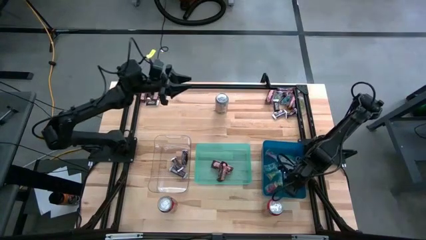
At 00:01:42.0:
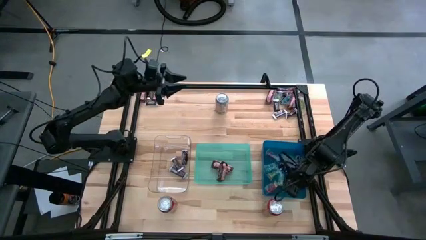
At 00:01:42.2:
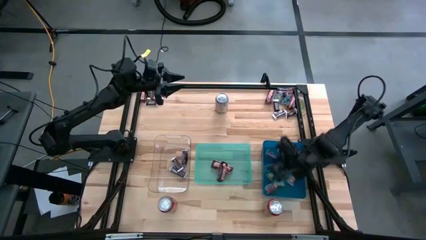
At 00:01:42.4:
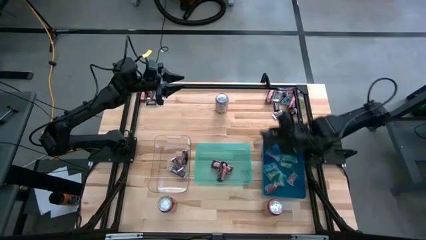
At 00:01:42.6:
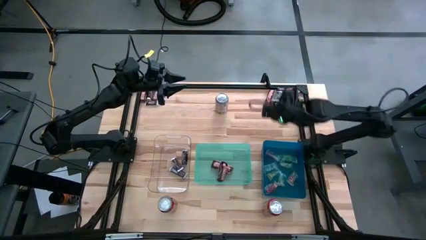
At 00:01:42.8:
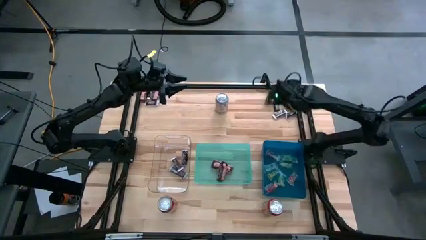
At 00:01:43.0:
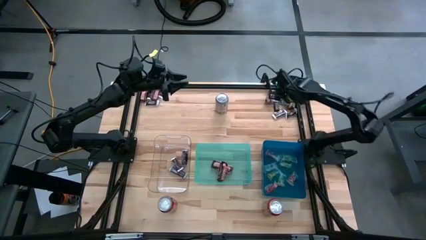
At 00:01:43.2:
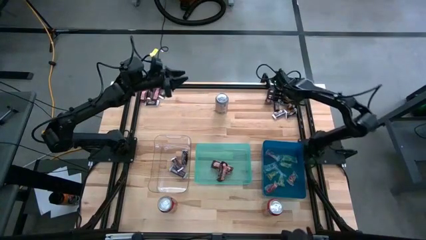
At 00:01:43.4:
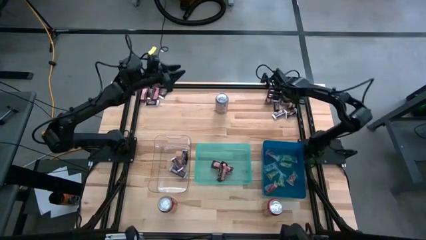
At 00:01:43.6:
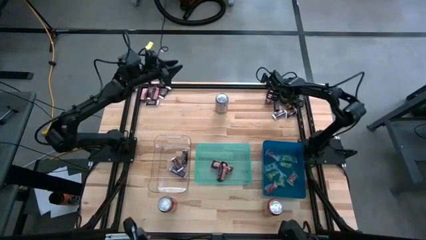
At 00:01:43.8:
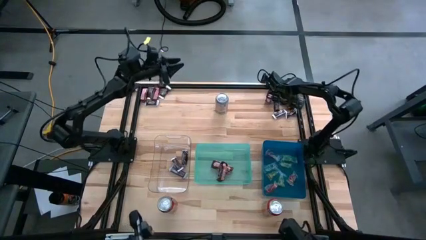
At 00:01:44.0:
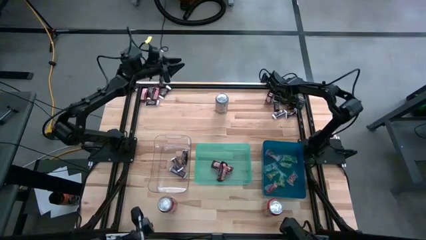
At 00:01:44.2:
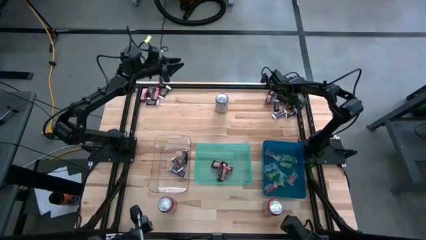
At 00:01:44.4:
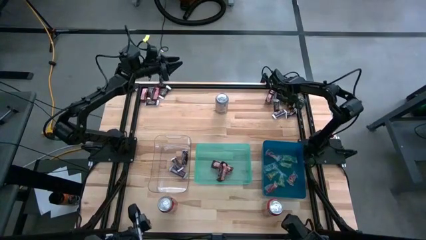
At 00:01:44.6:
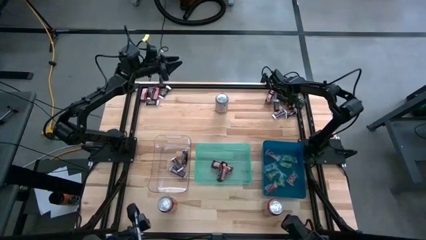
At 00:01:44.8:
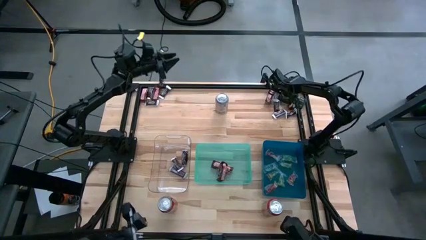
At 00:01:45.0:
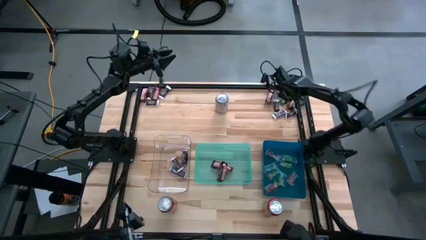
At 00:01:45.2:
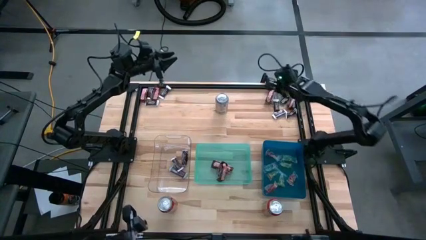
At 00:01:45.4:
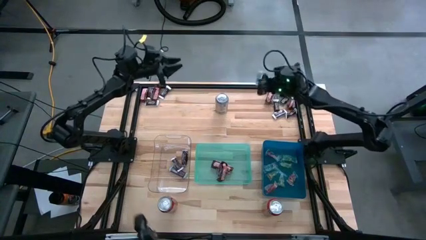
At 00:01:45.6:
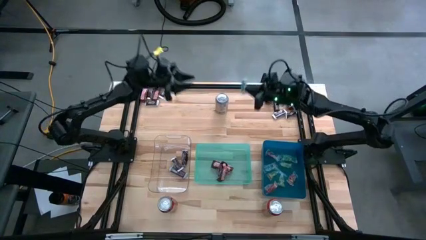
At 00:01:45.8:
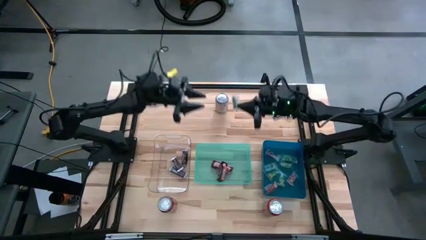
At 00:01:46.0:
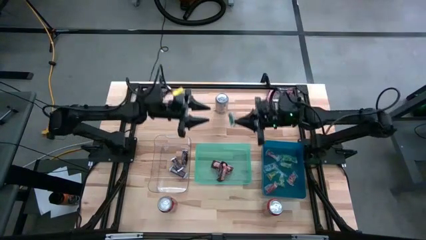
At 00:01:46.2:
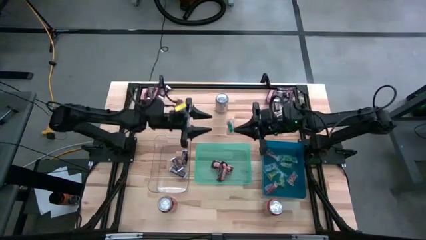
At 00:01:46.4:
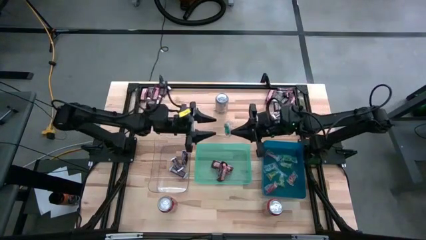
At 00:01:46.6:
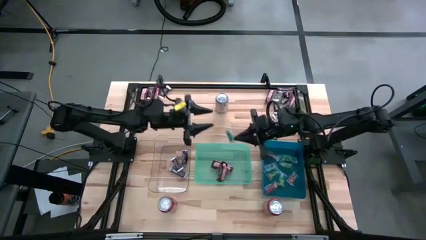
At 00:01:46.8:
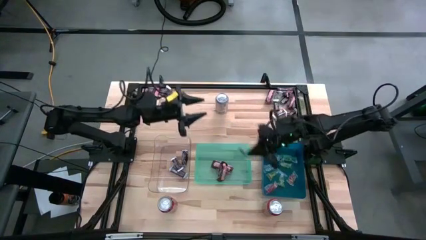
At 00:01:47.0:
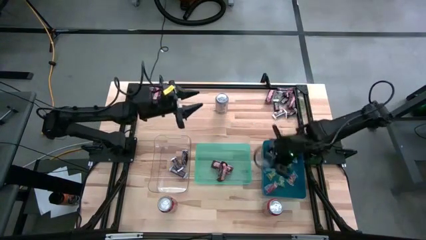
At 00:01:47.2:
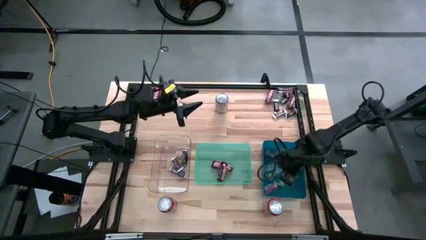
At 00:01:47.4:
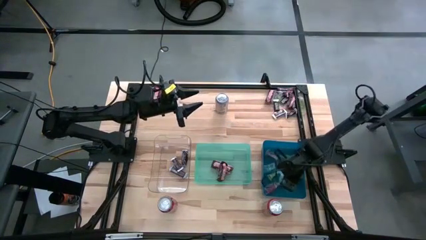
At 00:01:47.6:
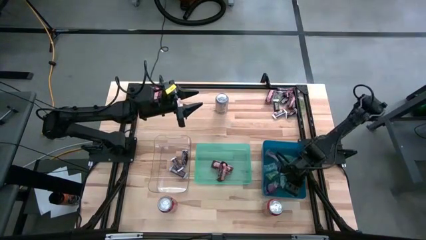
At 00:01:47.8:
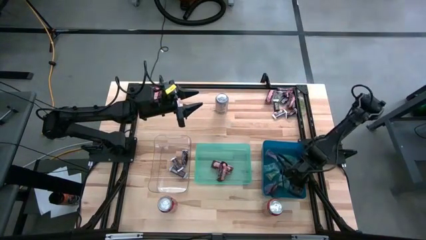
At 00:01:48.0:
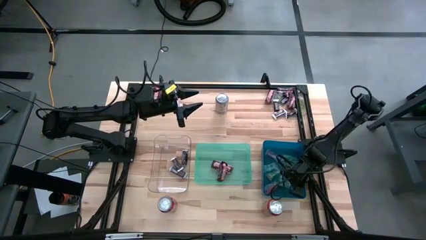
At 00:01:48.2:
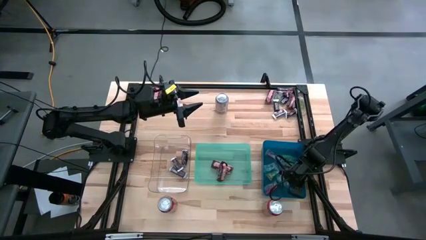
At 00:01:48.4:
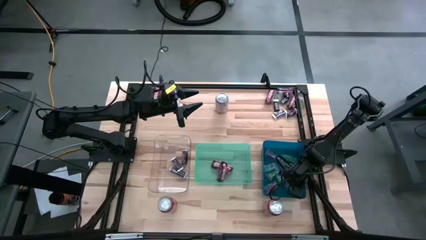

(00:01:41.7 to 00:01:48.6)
Task: Organize candy in baskets
Put the blue gummy into the blue bin

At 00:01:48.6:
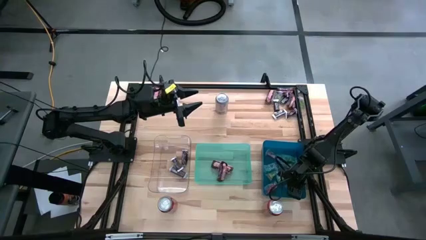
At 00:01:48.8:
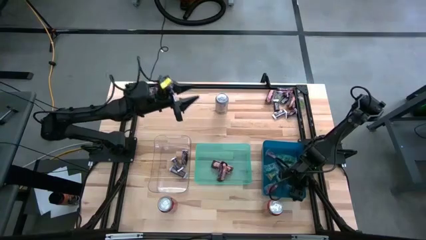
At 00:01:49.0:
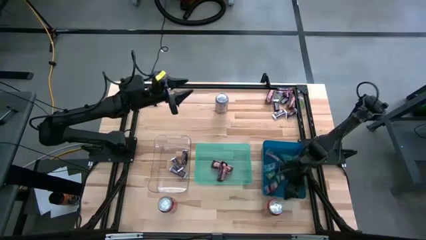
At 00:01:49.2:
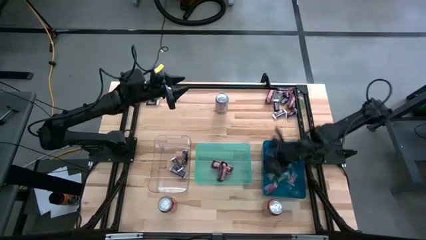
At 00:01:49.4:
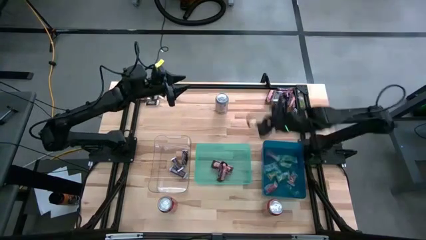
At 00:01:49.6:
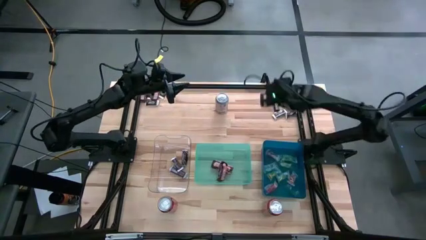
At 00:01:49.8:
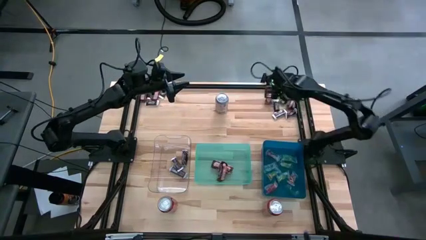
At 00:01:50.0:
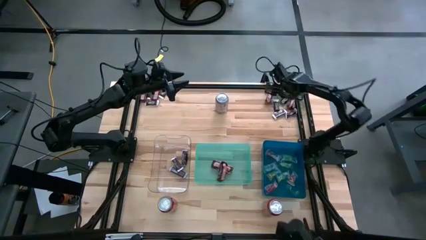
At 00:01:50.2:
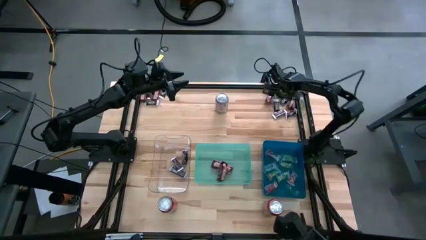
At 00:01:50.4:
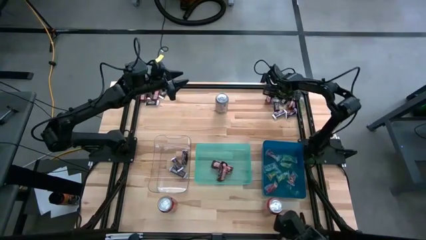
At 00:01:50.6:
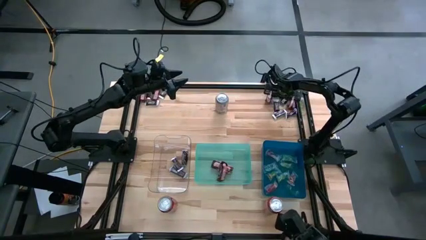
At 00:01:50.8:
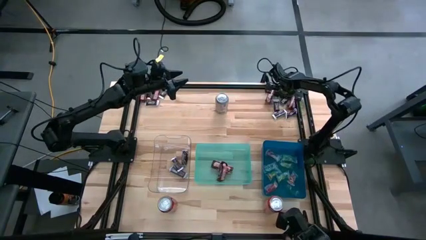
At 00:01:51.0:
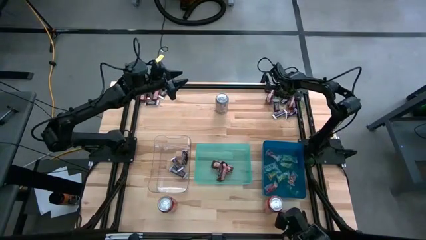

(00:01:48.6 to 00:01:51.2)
Put the green gummy into the blue bin

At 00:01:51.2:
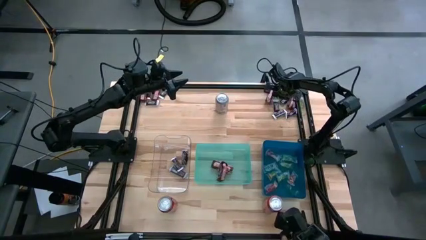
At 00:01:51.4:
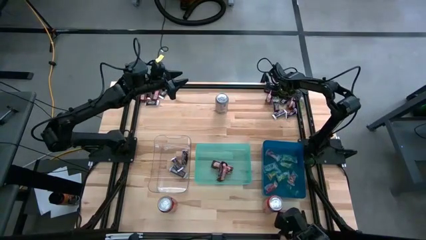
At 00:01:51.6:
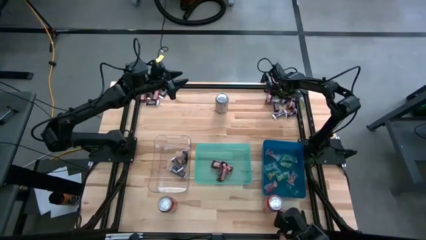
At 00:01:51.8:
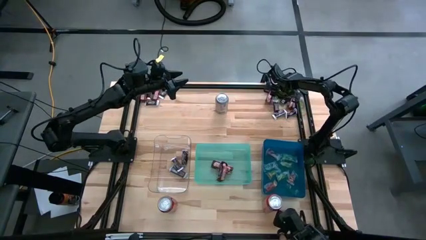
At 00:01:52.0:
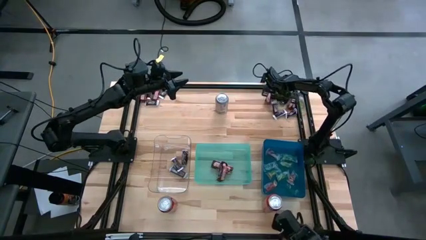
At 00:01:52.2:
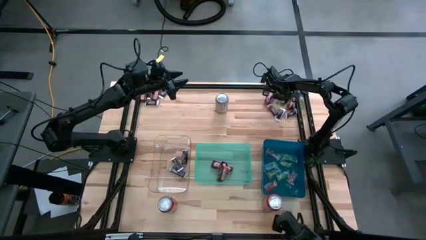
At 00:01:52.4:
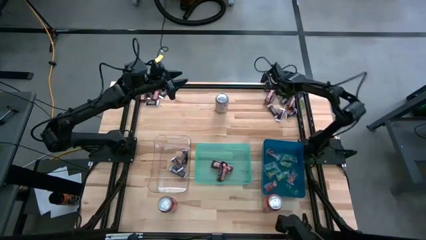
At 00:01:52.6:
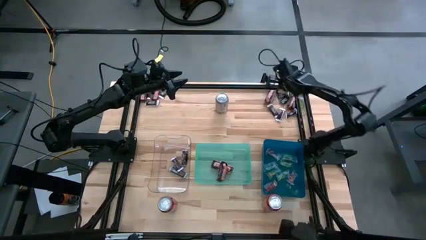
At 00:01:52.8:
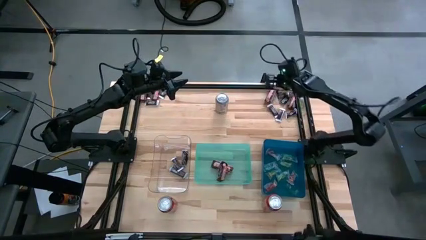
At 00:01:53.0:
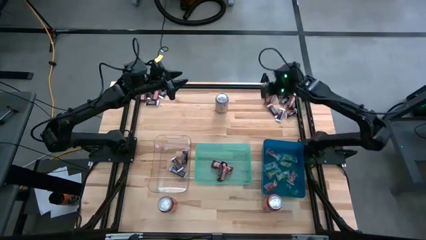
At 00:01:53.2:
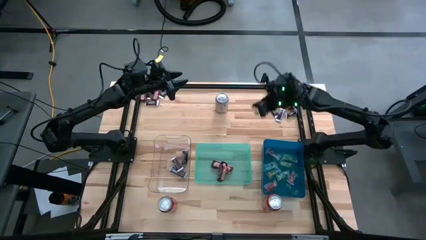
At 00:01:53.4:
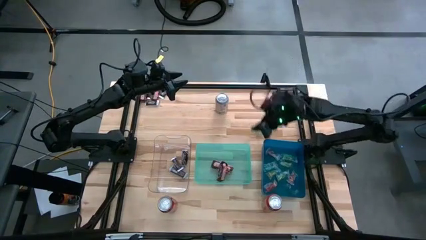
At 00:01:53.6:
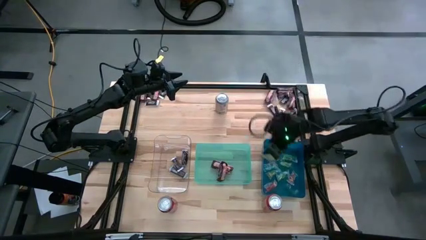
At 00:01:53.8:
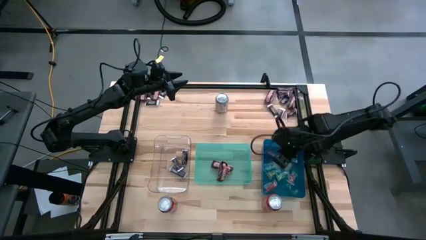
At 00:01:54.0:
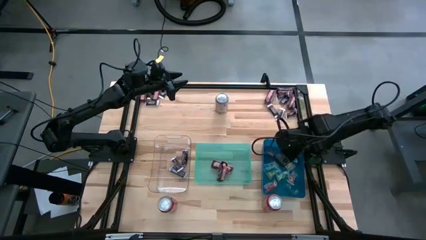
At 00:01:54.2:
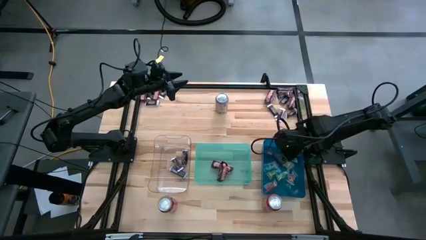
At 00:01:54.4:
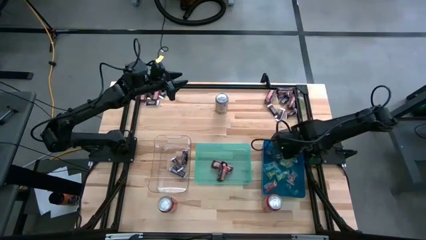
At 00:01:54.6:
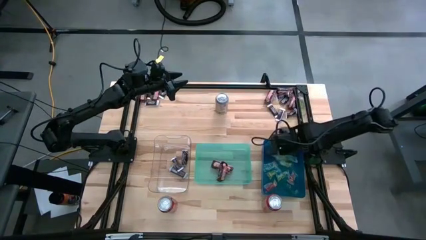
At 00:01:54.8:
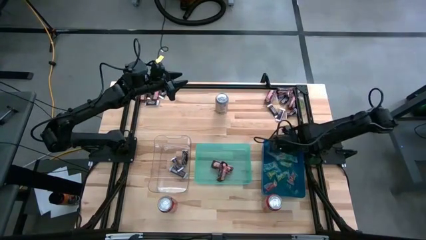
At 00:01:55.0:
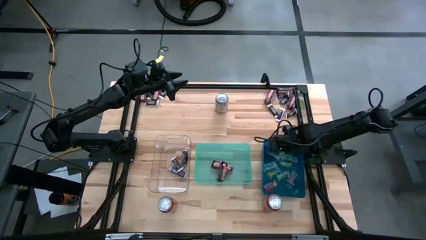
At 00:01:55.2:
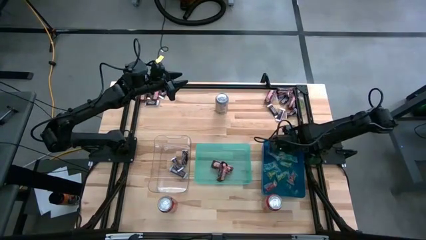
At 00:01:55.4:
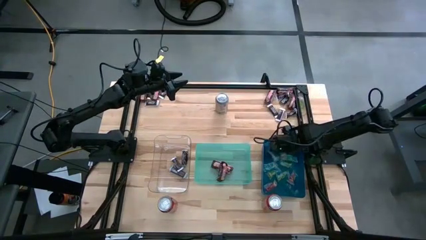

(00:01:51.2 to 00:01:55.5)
Put the green gummy into the blue bin
